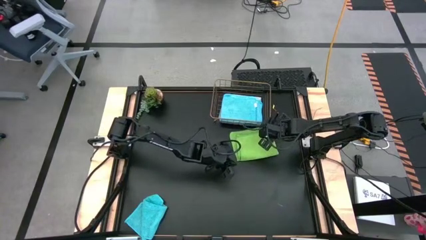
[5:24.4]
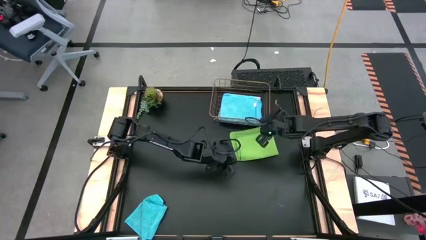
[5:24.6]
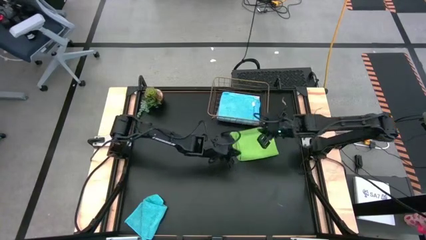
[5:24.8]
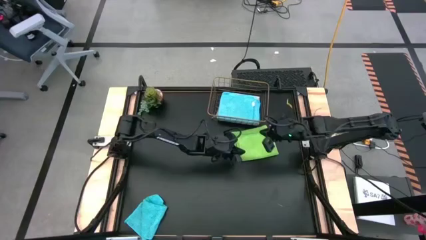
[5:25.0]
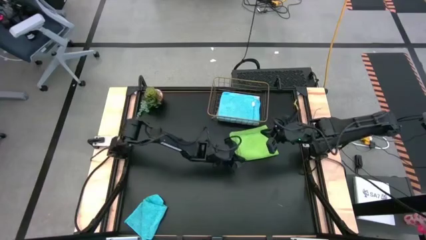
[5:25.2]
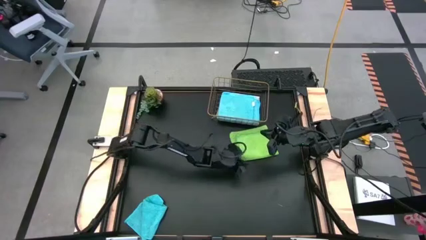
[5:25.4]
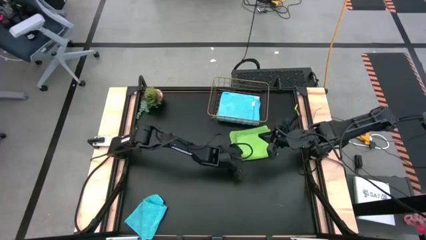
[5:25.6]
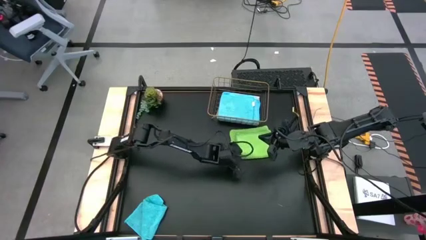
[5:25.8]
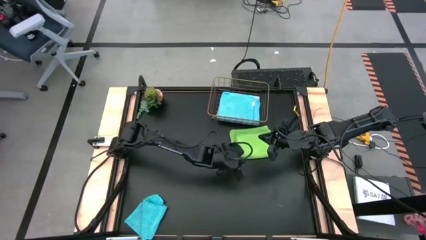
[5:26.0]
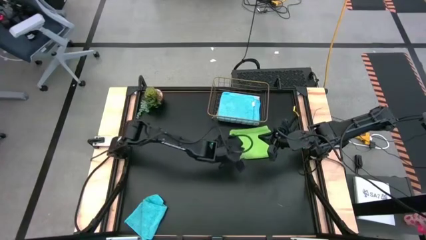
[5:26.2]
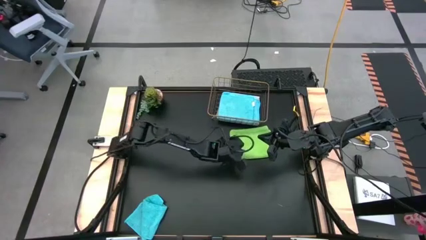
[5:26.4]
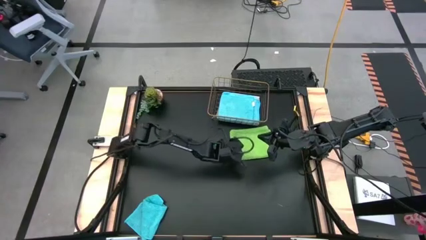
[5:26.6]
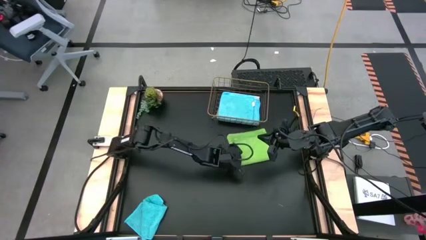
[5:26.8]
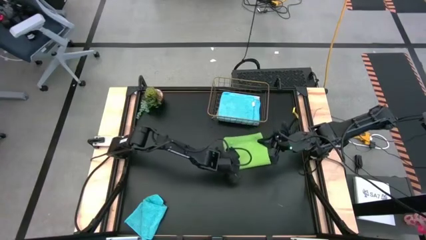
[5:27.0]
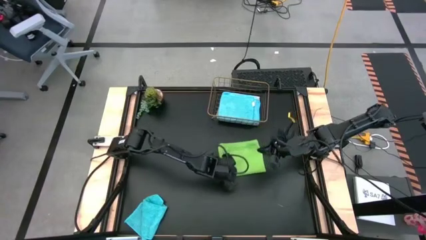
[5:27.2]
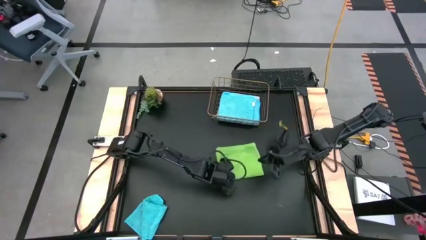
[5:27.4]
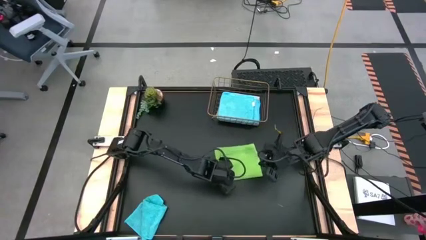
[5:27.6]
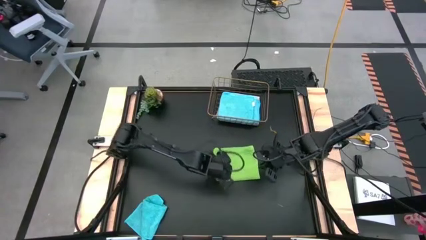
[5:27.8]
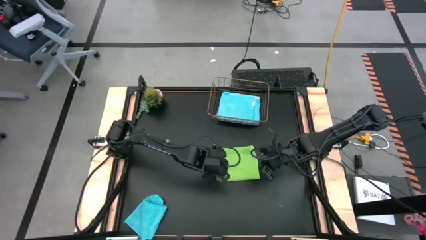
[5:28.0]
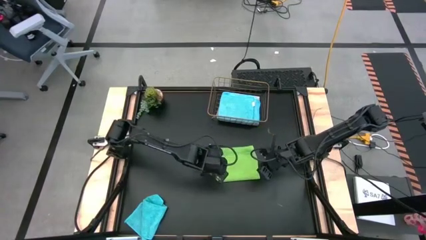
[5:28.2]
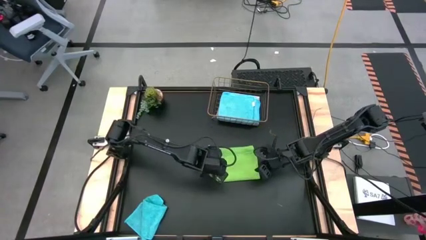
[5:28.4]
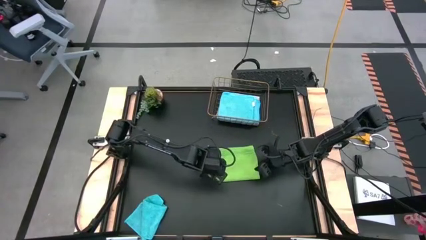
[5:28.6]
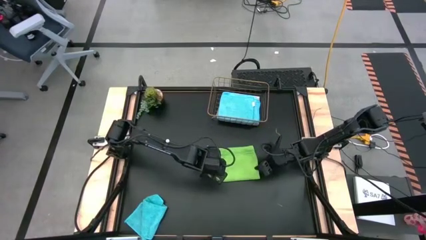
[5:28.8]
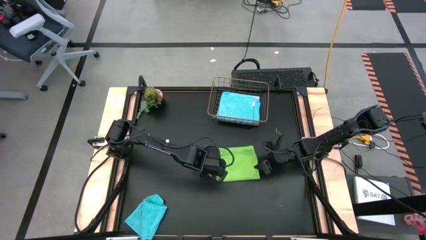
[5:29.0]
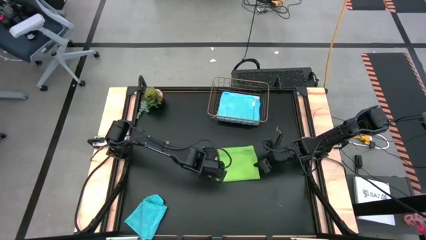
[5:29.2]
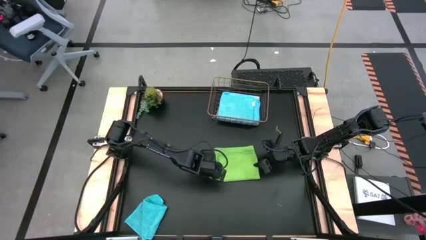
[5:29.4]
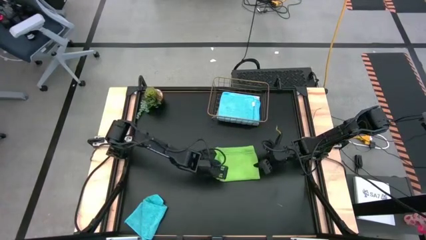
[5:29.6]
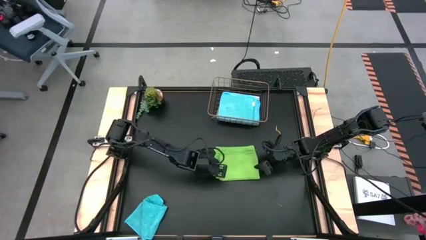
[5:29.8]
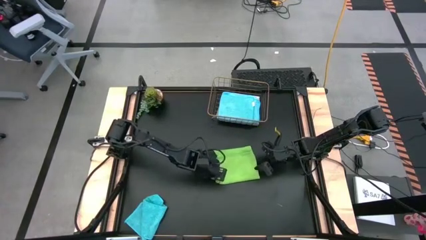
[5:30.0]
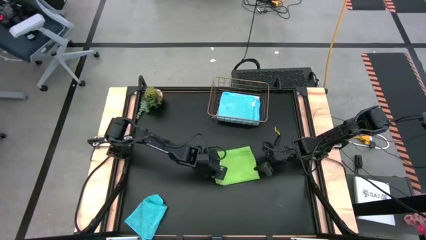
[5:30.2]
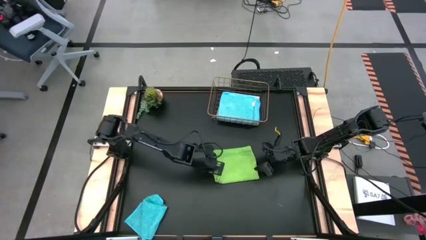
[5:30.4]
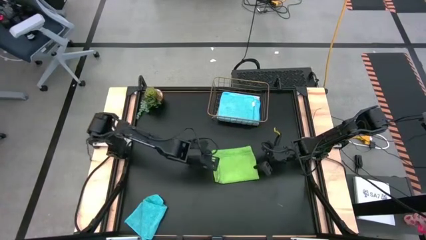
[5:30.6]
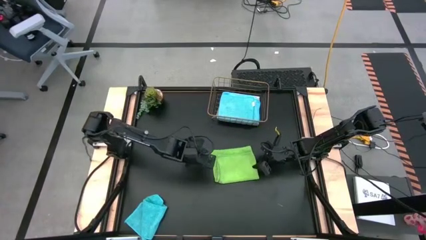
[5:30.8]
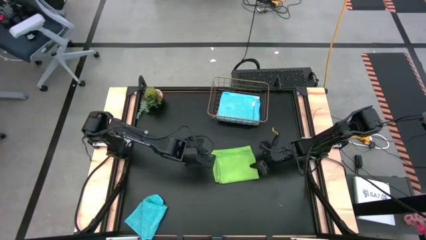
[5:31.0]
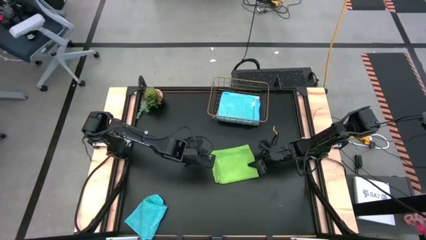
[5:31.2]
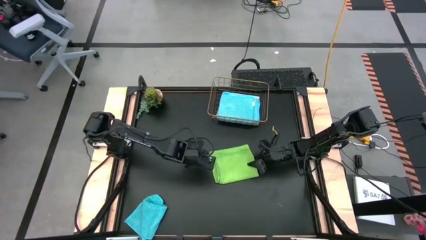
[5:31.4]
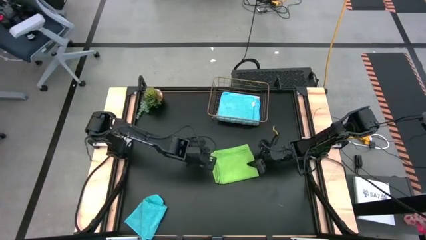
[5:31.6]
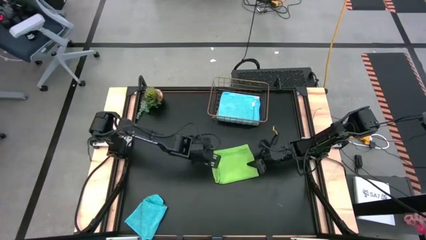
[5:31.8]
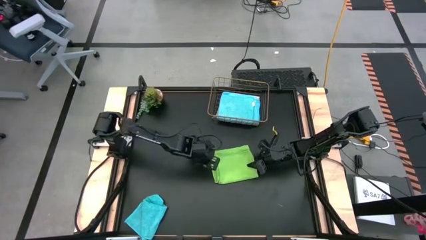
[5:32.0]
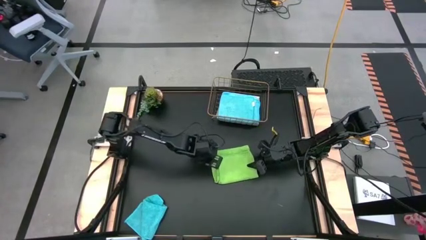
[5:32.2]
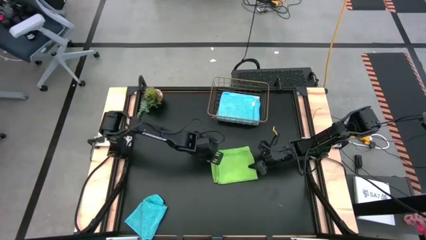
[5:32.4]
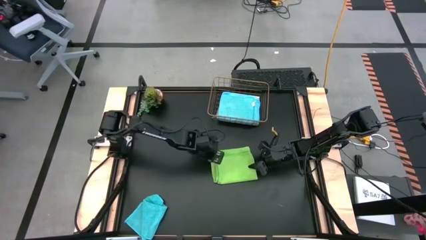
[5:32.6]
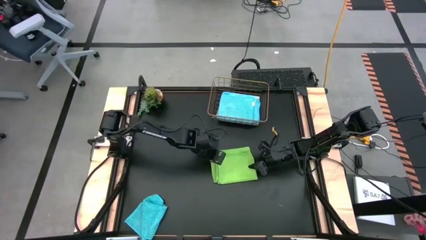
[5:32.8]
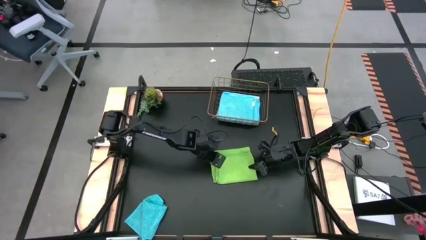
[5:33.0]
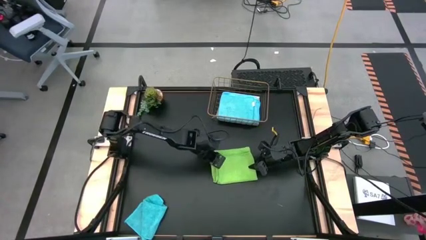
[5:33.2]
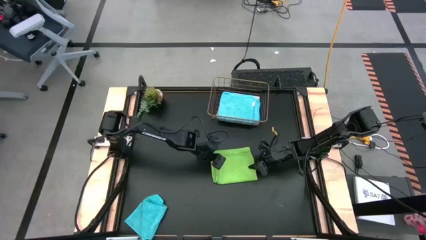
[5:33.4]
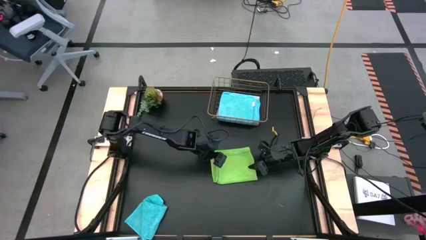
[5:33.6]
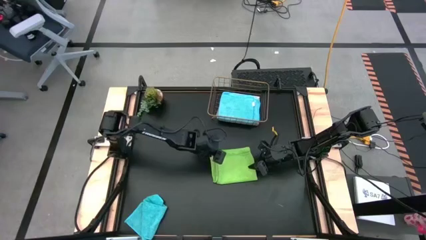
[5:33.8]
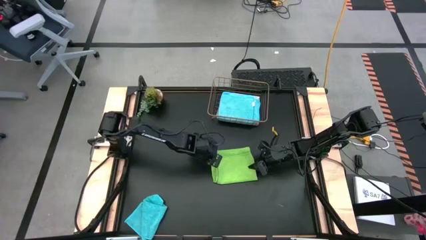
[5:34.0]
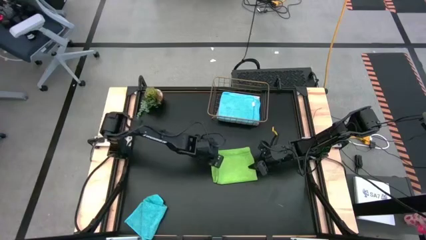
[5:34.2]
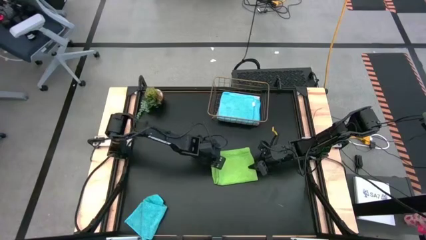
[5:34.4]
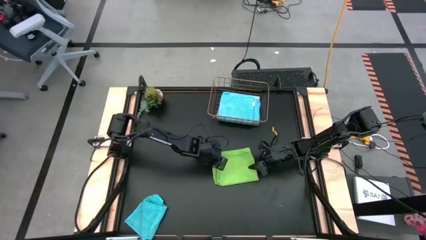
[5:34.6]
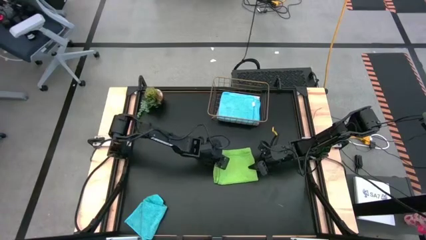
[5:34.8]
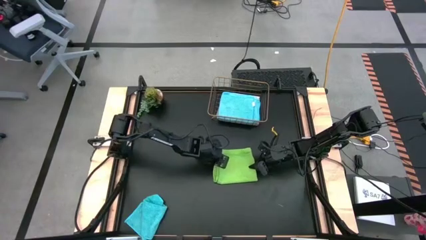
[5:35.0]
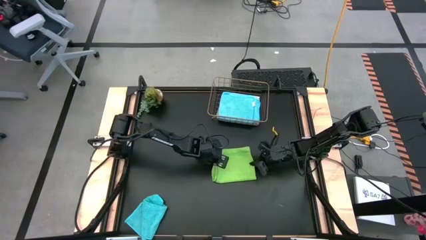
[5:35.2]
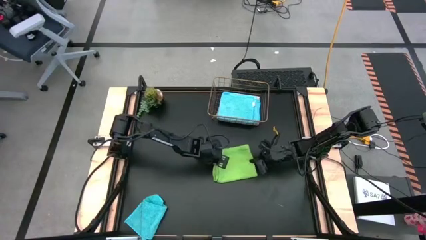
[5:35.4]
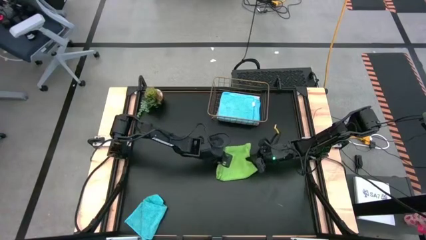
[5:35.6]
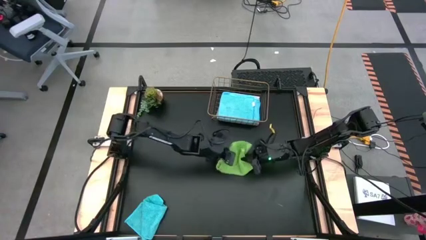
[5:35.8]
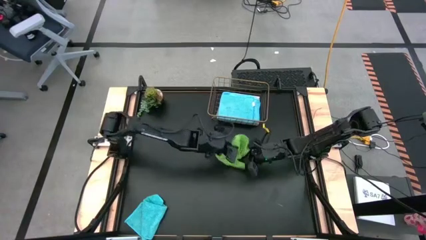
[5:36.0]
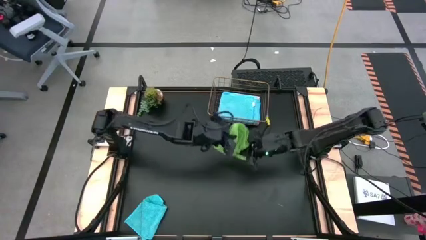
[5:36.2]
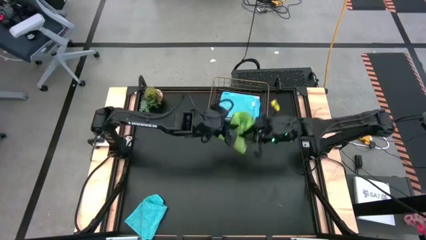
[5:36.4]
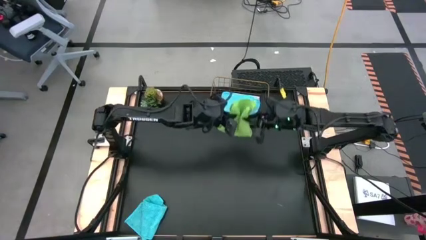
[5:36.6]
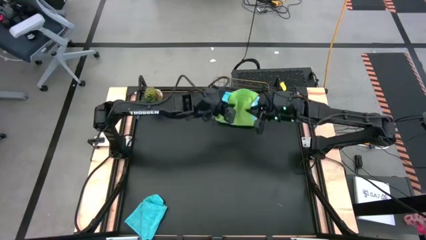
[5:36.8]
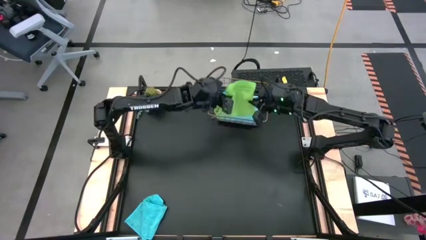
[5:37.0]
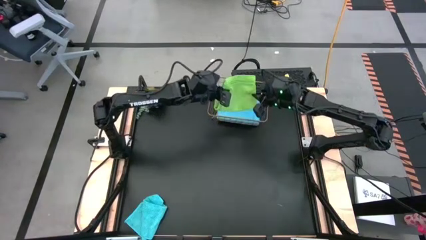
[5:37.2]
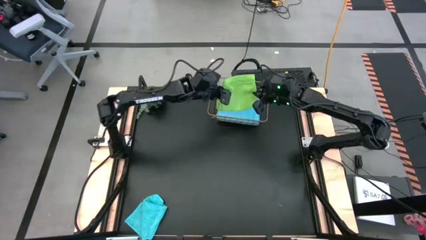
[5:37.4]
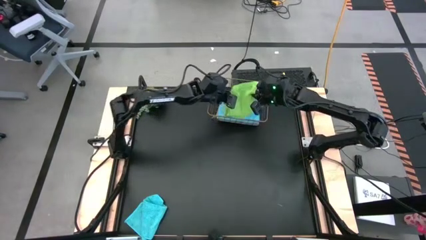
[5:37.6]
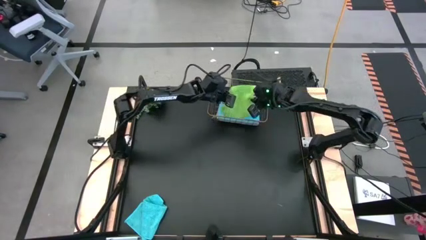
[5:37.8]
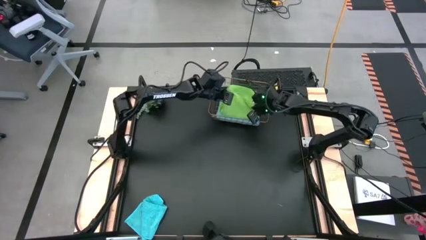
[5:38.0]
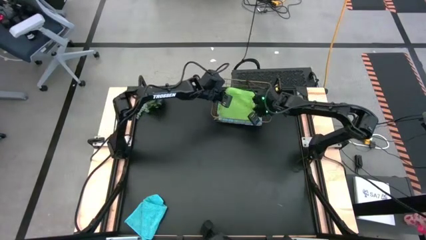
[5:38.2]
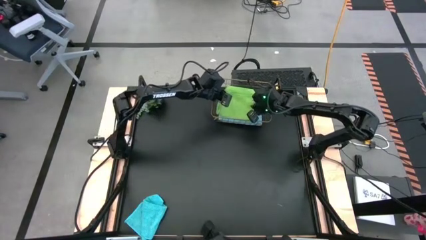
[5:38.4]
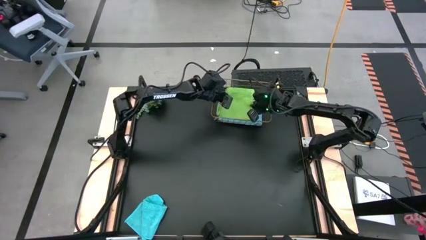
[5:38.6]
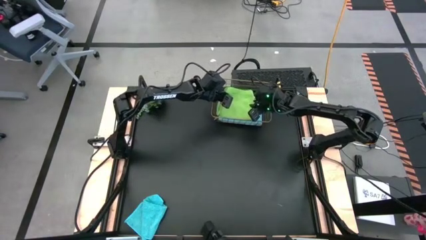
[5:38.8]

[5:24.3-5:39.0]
Task: Fold microfiber towels
Put the green towel into the wire basket
